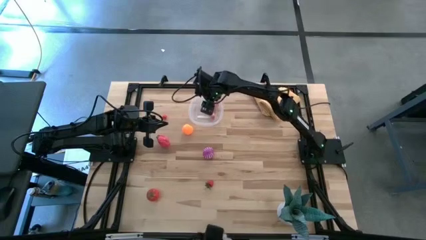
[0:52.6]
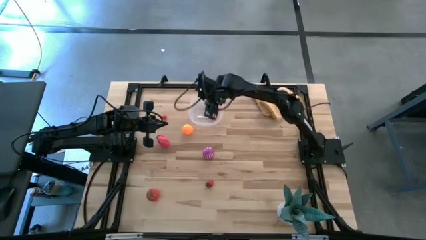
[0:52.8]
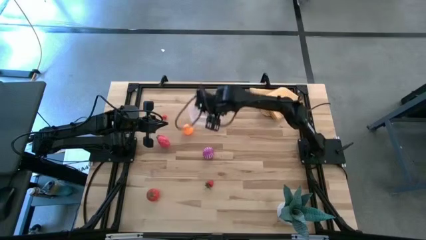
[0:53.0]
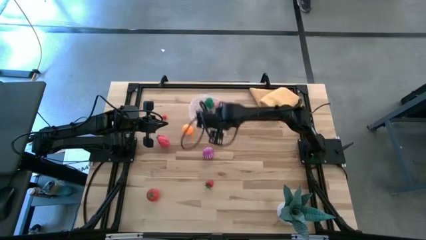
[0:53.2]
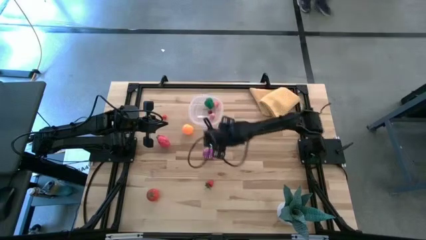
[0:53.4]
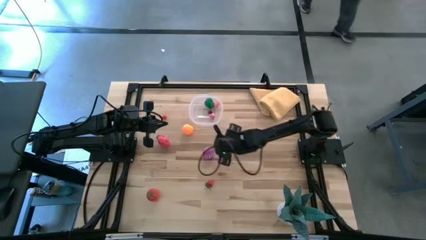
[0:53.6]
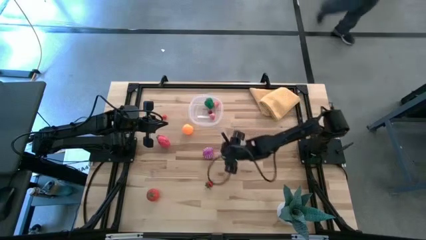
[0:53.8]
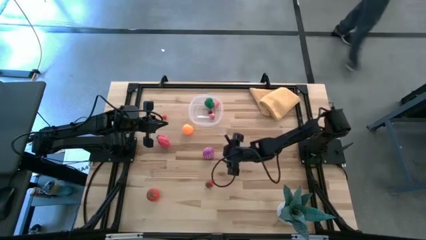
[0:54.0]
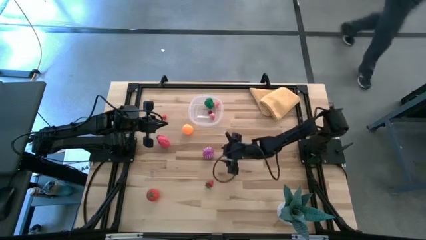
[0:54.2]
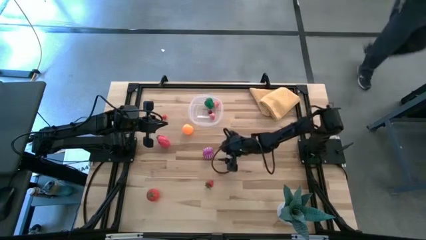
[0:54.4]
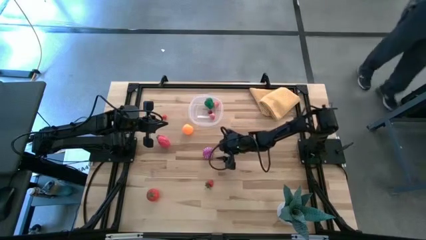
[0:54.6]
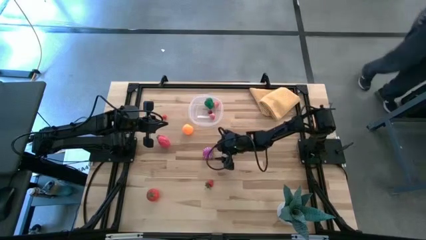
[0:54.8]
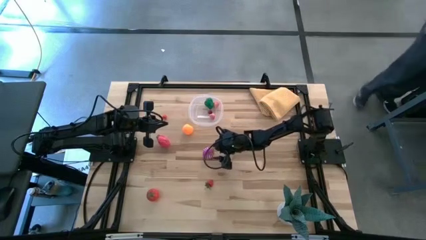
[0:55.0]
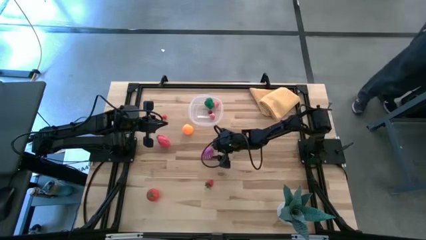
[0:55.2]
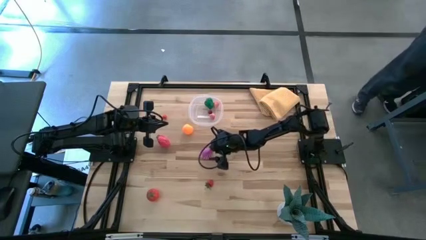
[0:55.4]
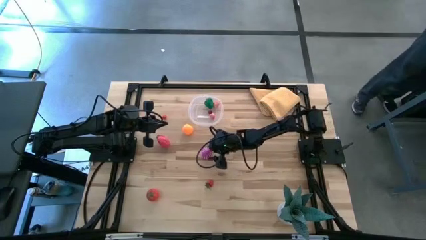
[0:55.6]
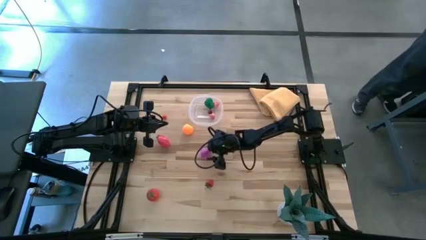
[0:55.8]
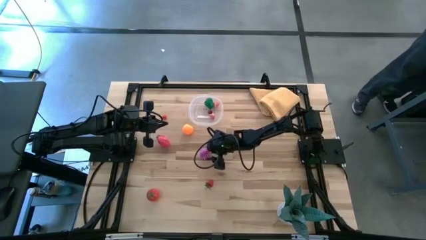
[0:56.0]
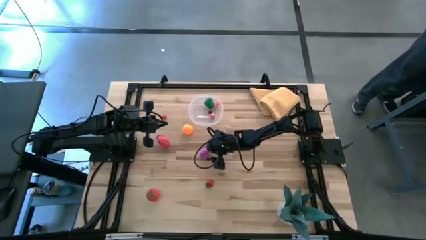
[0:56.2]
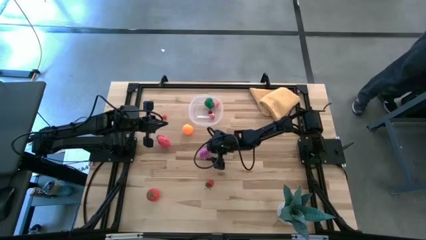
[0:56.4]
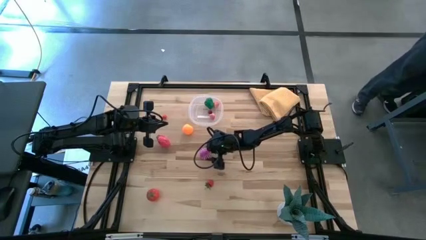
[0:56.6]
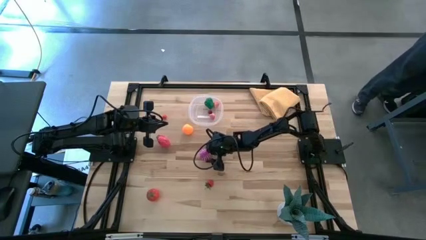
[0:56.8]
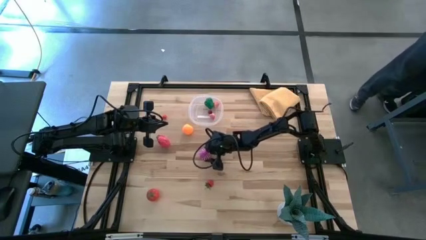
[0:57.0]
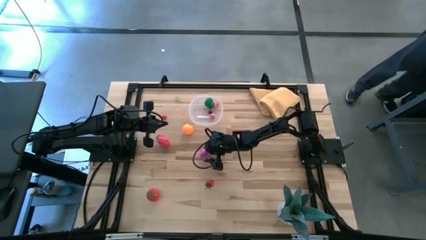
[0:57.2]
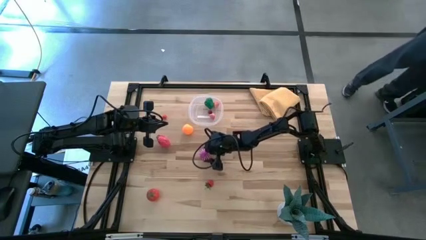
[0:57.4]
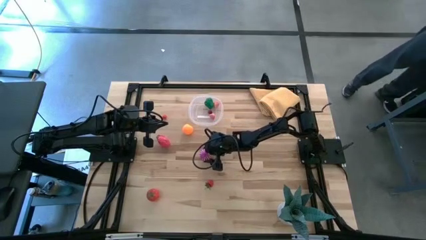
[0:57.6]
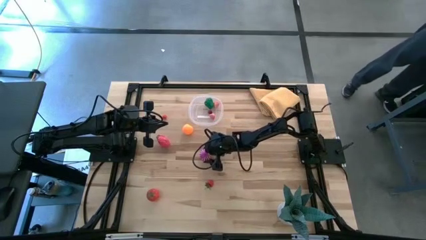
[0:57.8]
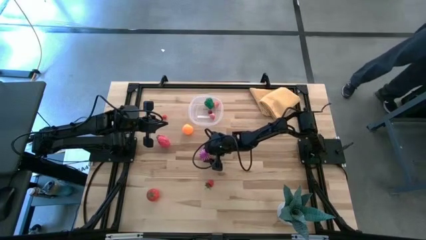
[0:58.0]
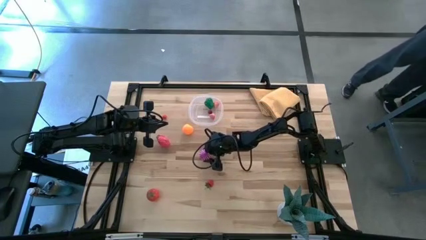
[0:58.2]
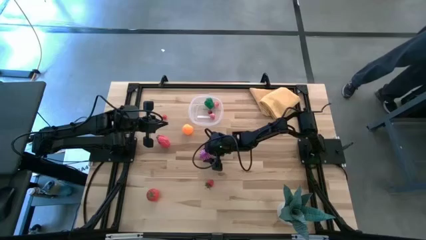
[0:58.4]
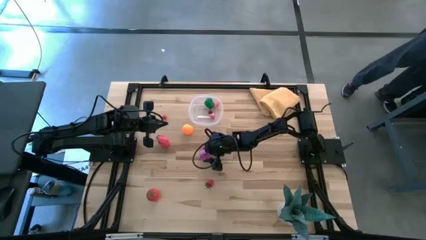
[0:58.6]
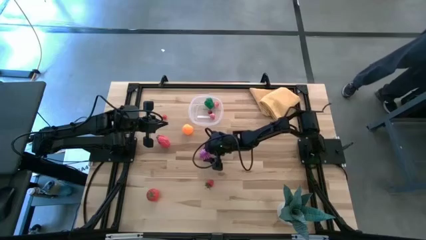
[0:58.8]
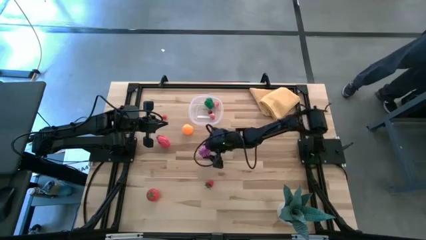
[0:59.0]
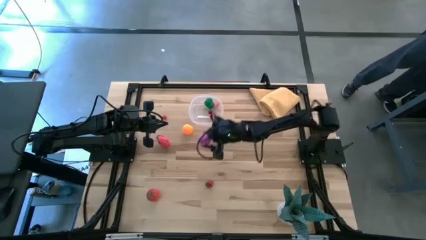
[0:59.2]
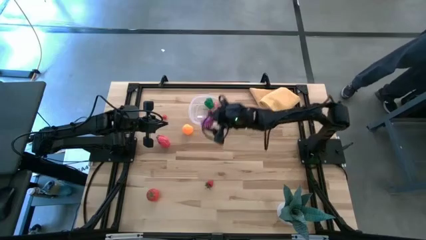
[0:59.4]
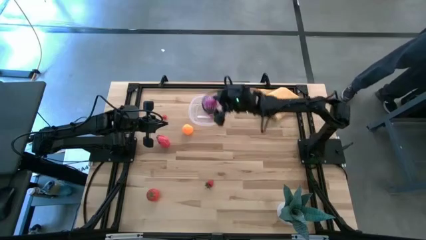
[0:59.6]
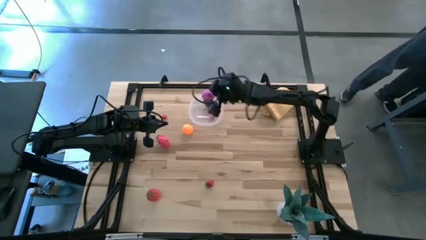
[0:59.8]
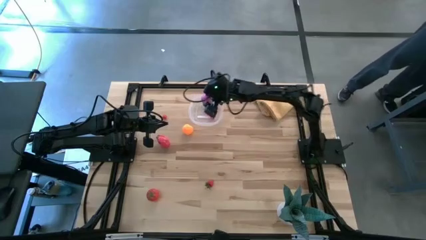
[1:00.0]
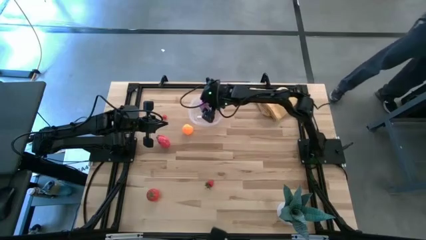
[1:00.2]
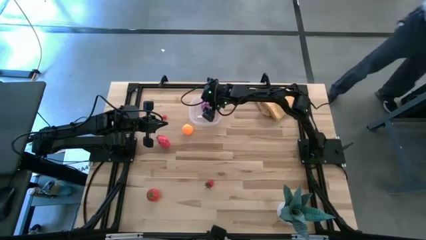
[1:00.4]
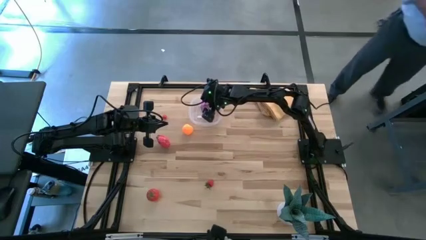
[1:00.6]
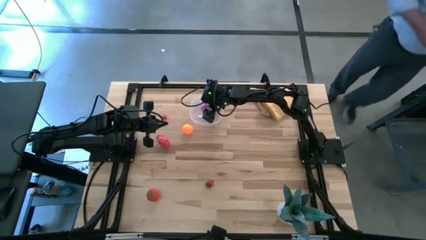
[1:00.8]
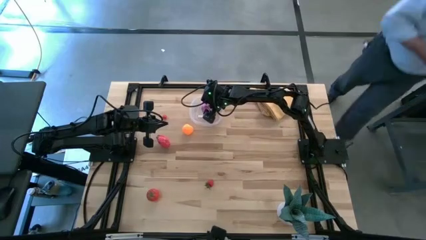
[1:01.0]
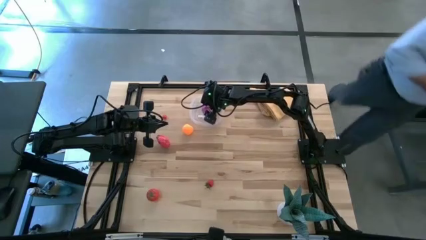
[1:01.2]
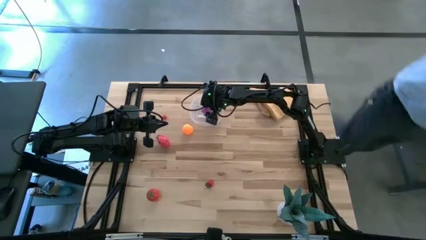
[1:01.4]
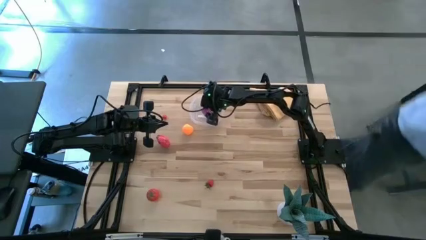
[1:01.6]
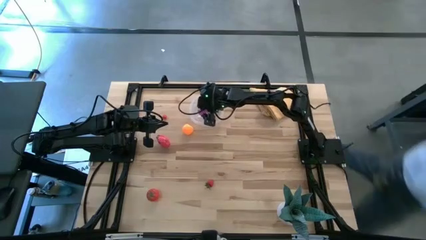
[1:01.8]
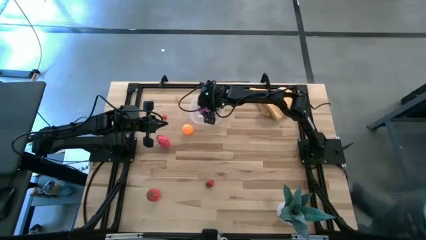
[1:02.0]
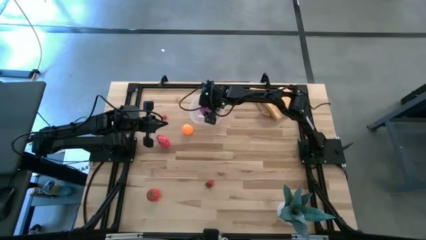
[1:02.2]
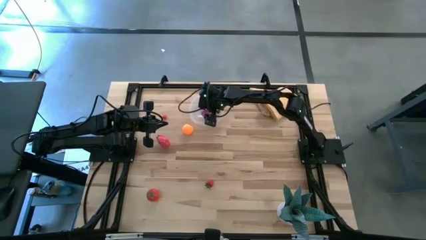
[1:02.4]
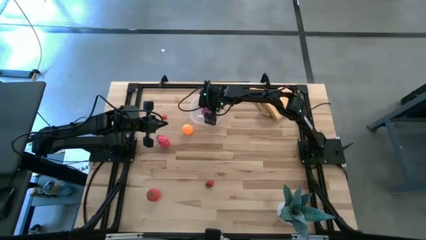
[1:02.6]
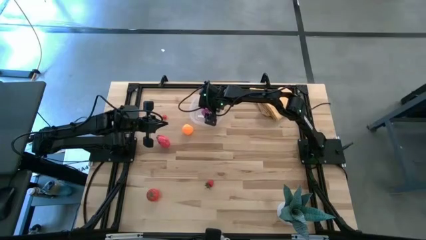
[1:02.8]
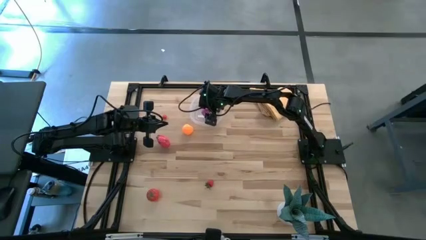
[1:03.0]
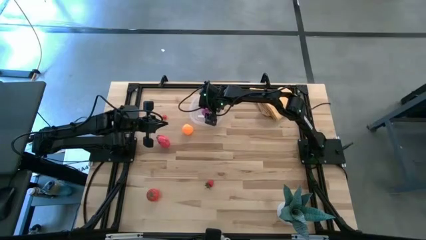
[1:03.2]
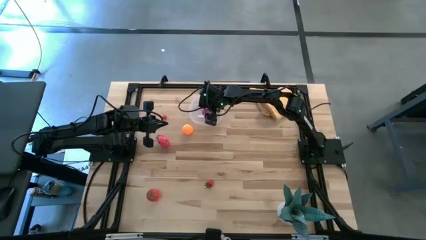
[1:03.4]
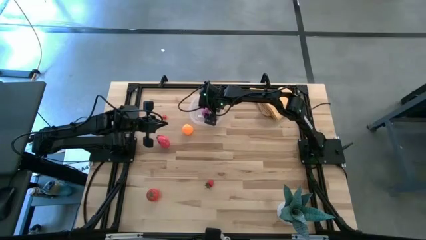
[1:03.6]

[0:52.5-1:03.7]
Task: Pick and placing Produce into tupperware
Put the white and purple onion into the transparent bin

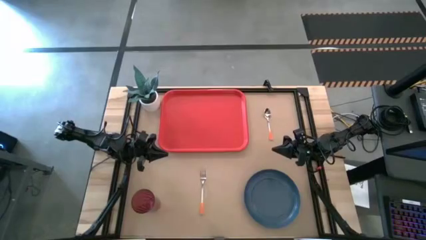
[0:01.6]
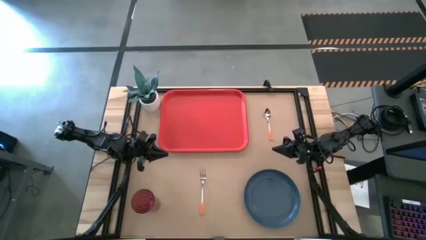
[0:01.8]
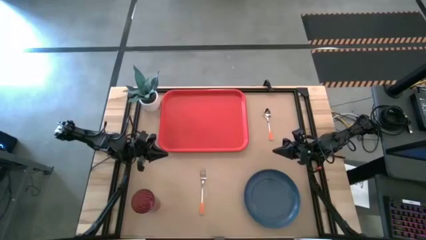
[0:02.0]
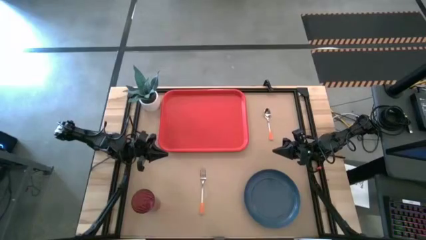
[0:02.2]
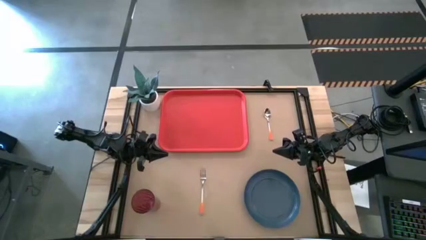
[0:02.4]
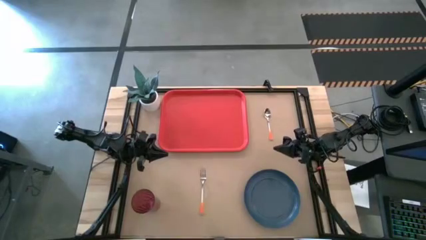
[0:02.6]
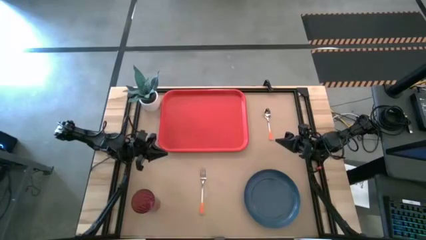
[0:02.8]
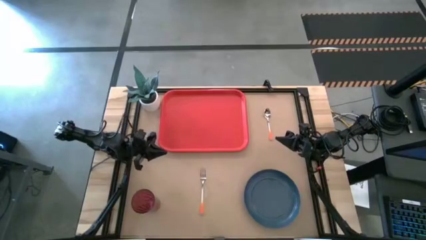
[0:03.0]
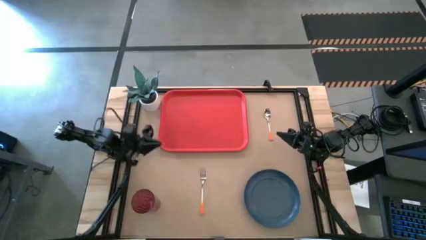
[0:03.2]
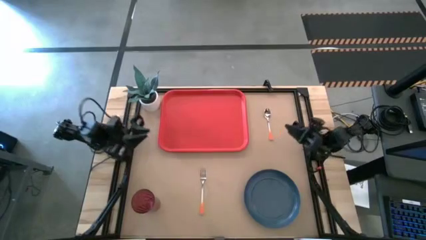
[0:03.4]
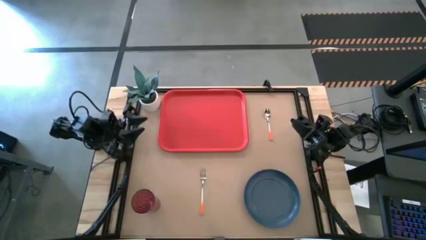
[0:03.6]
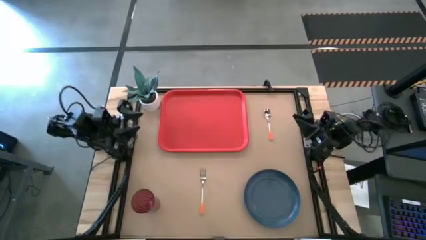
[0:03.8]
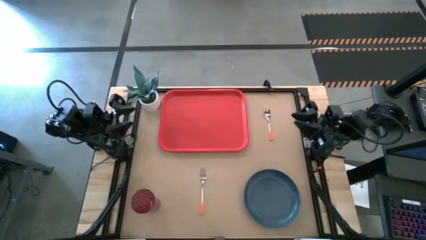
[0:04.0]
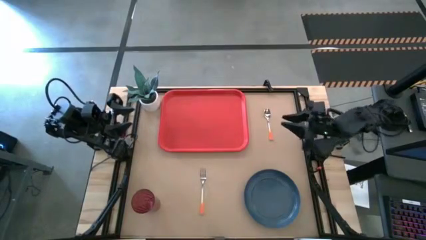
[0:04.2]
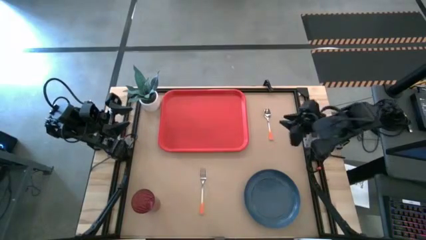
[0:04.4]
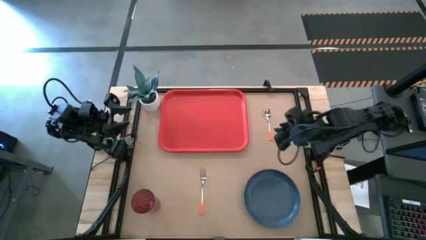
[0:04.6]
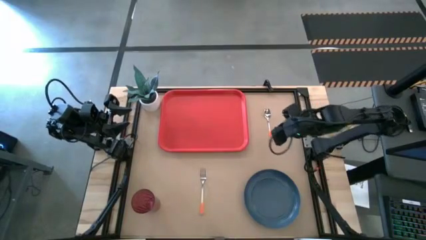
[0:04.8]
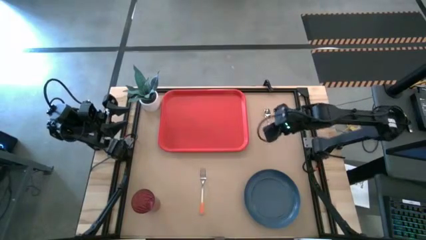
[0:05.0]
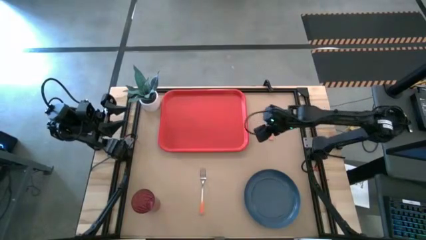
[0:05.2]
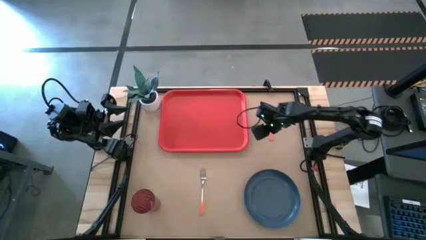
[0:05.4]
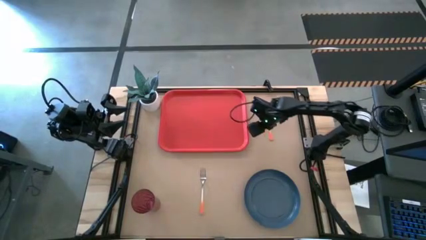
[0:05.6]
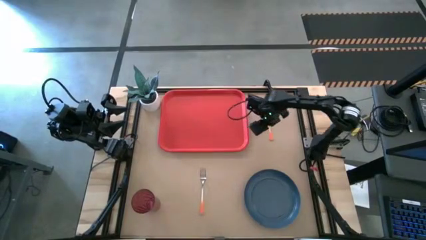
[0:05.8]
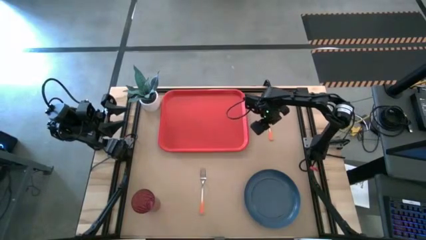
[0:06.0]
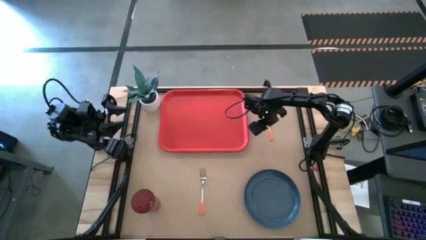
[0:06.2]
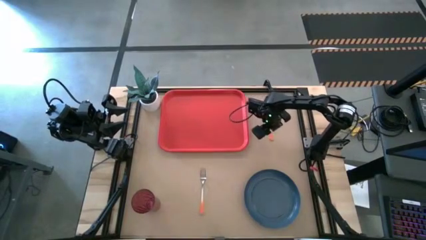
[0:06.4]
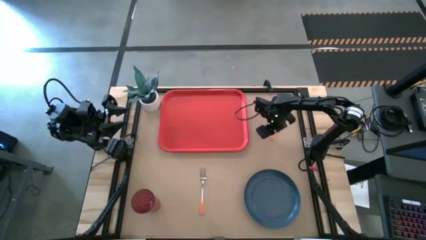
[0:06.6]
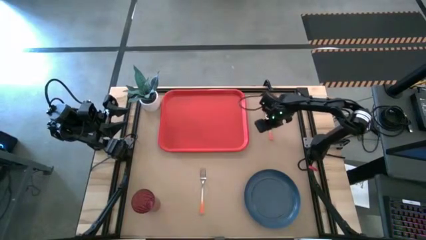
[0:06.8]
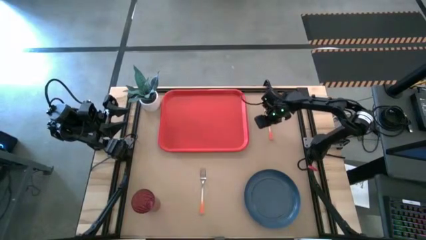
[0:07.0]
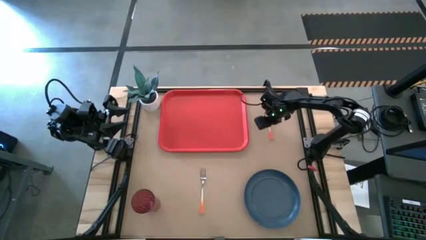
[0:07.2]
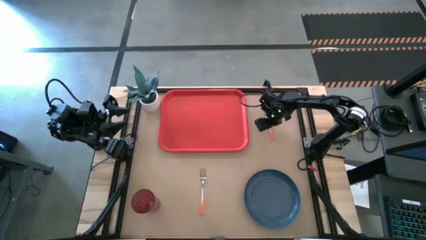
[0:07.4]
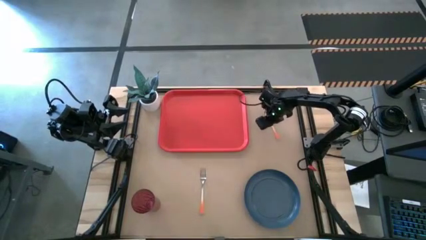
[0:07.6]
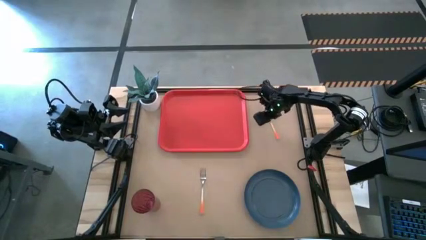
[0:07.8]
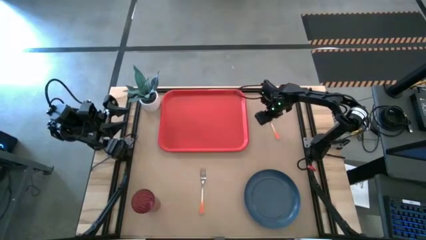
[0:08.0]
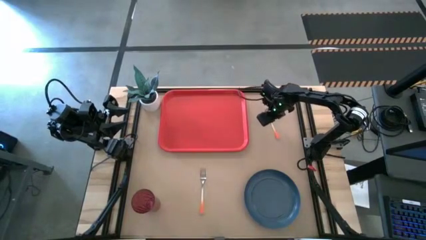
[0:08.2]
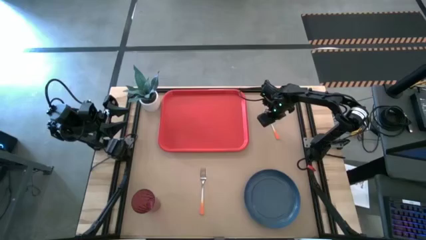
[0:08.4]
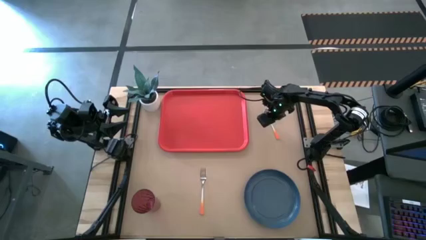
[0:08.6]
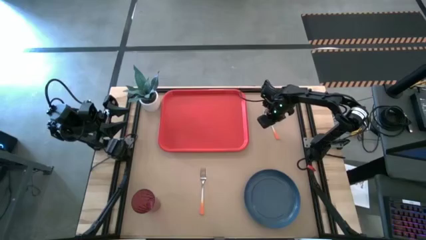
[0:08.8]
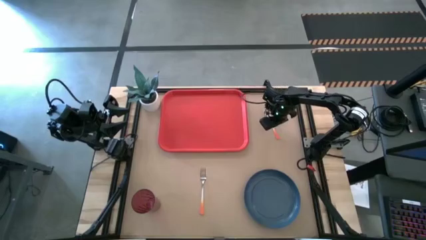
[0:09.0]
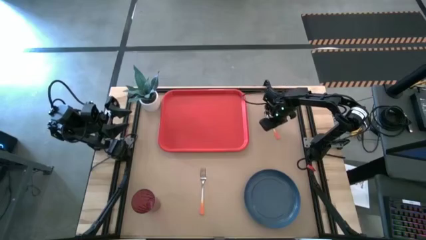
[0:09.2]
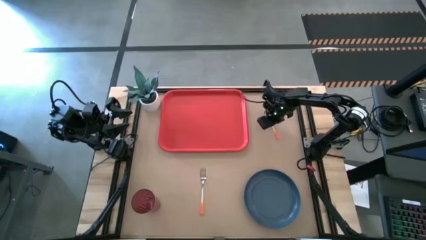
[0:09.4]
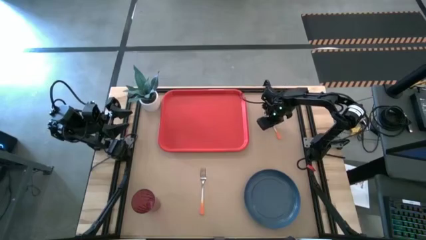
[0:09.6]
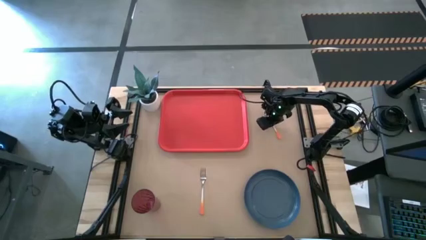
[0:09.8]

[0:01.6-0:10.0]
Task: Pick and place plate/cup/fork/spoon on tray
Put the orange spoon on the red tray
